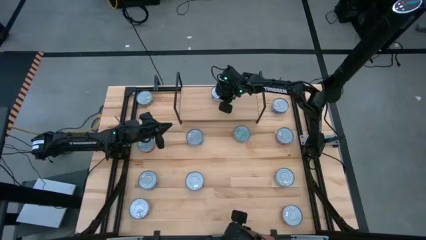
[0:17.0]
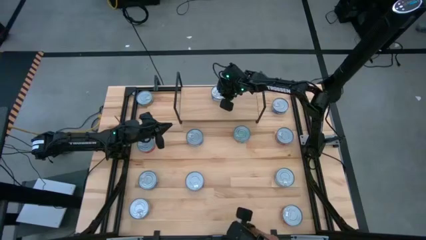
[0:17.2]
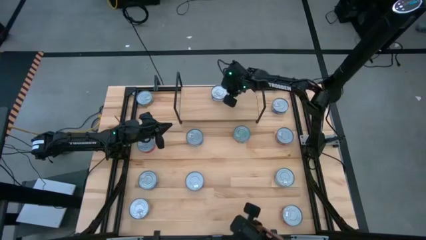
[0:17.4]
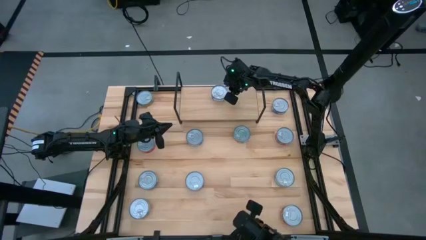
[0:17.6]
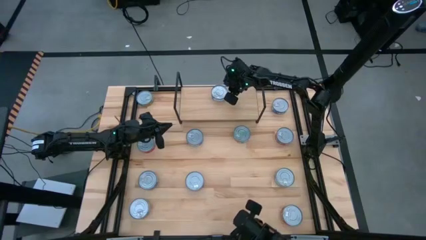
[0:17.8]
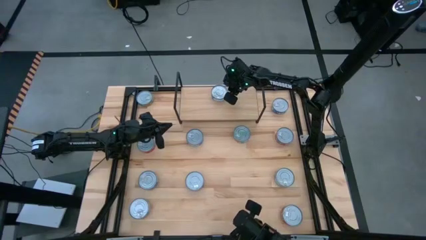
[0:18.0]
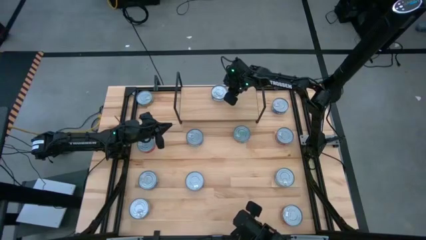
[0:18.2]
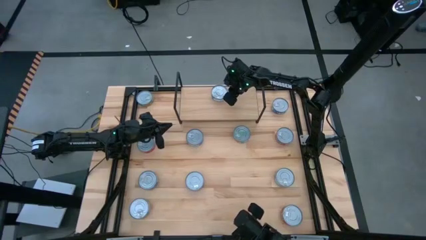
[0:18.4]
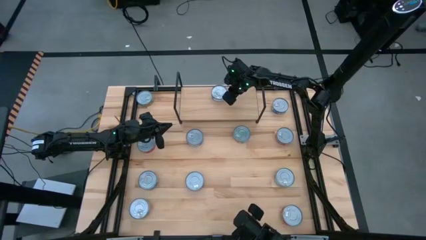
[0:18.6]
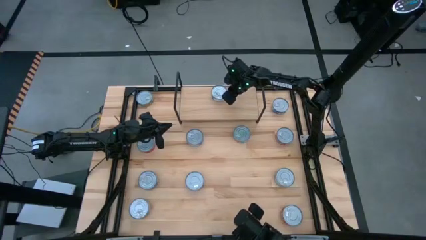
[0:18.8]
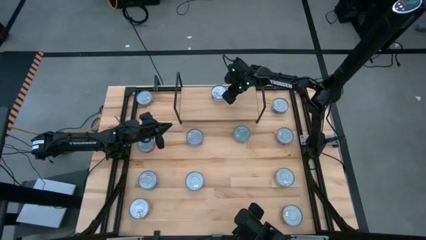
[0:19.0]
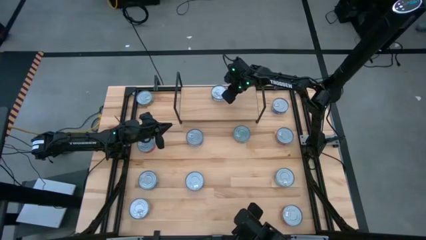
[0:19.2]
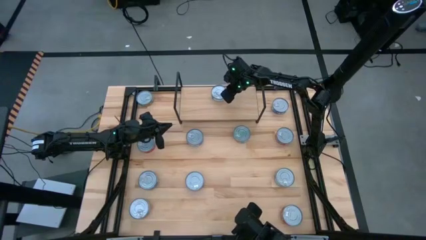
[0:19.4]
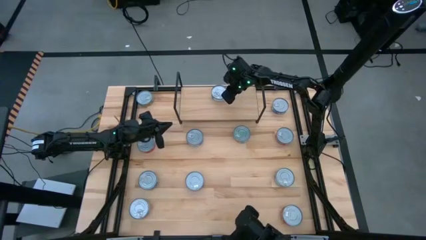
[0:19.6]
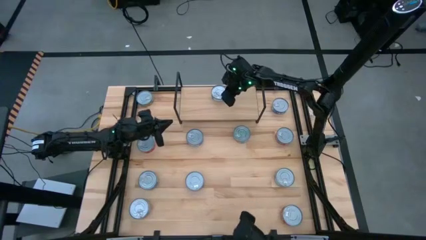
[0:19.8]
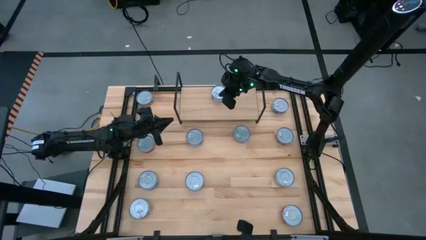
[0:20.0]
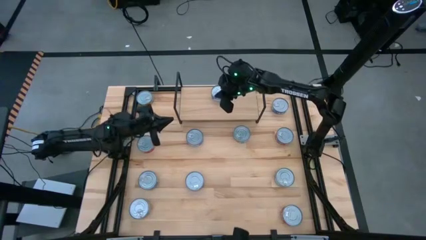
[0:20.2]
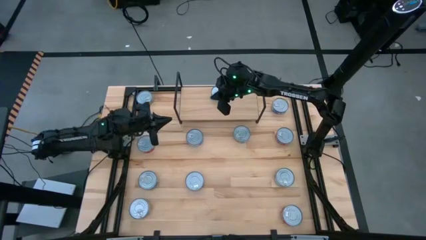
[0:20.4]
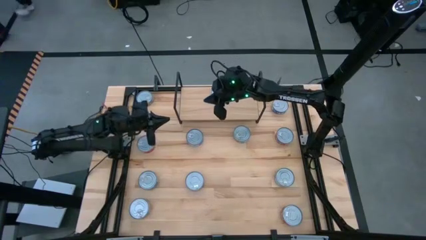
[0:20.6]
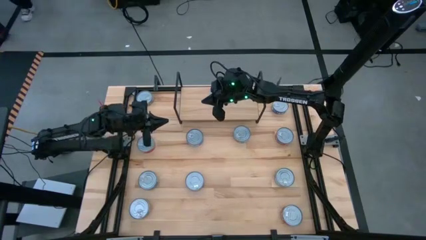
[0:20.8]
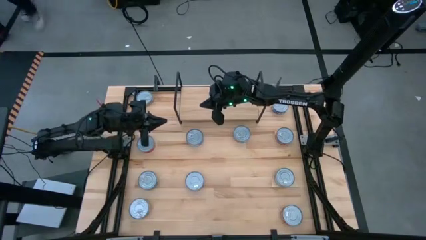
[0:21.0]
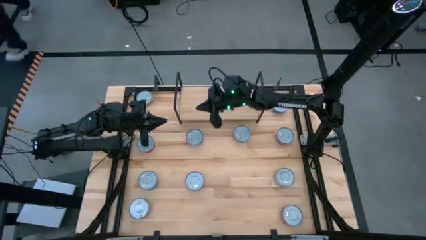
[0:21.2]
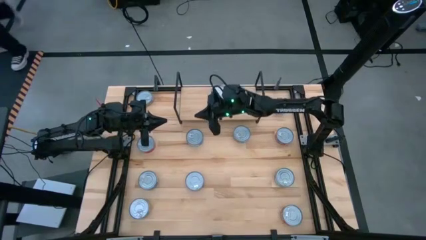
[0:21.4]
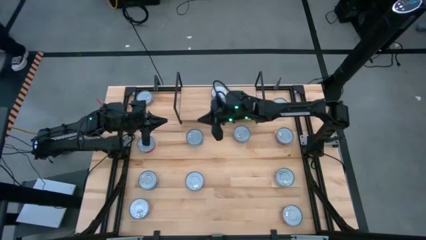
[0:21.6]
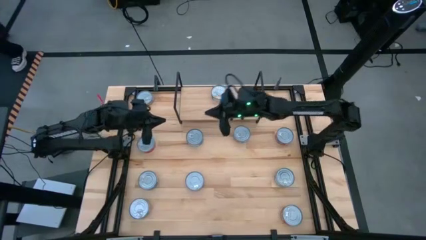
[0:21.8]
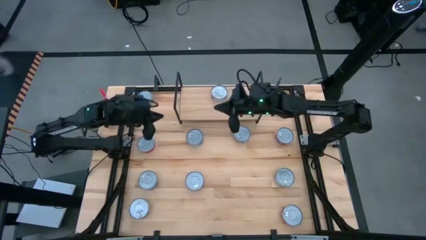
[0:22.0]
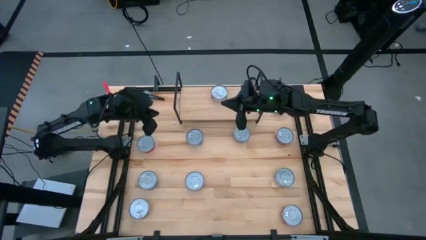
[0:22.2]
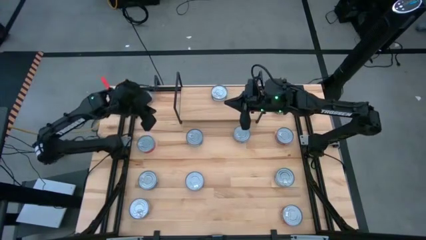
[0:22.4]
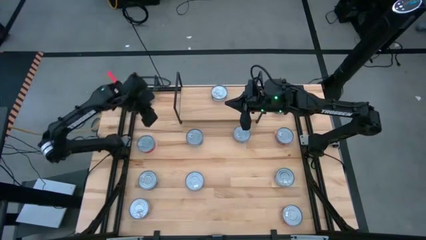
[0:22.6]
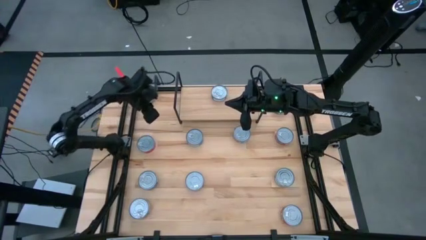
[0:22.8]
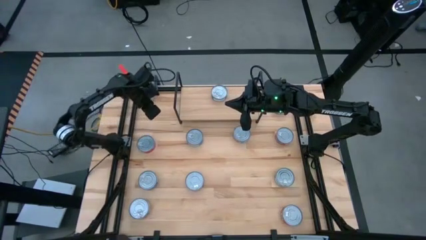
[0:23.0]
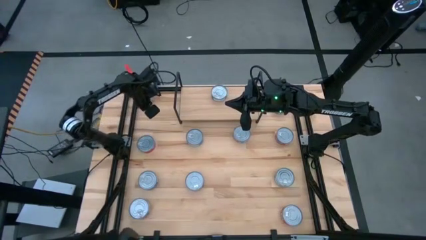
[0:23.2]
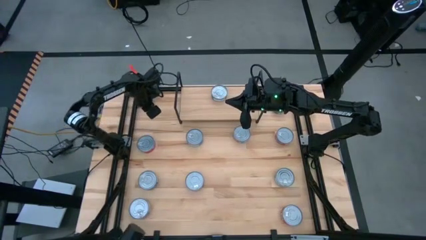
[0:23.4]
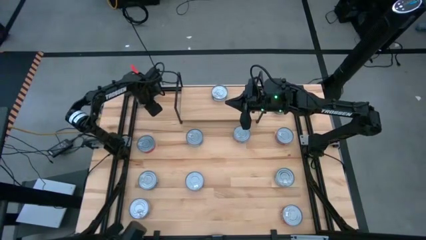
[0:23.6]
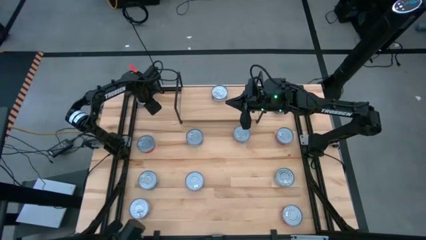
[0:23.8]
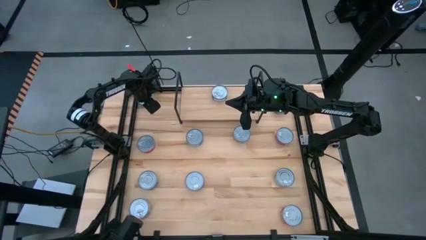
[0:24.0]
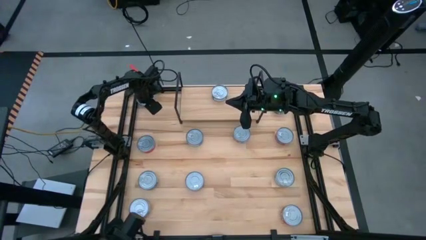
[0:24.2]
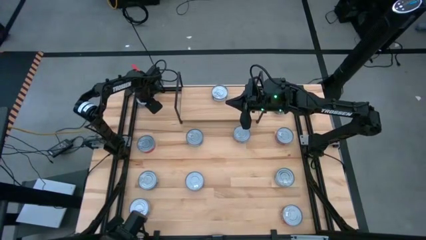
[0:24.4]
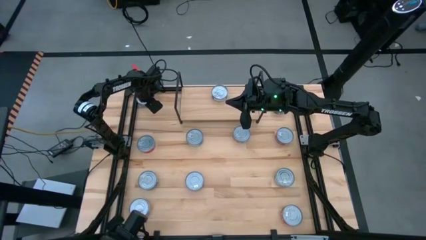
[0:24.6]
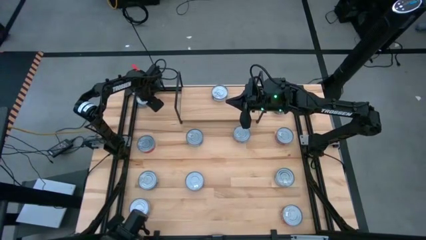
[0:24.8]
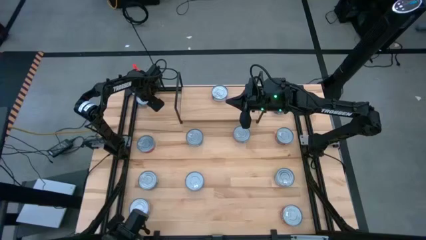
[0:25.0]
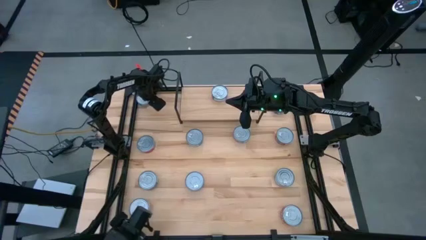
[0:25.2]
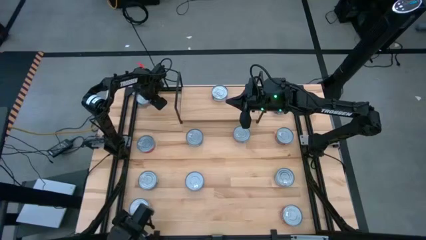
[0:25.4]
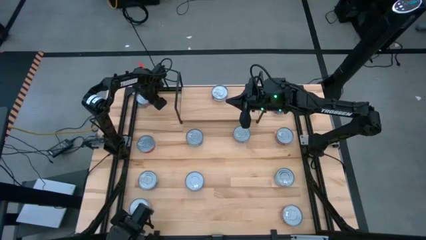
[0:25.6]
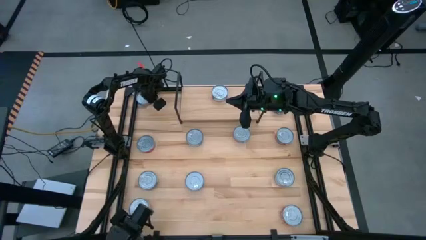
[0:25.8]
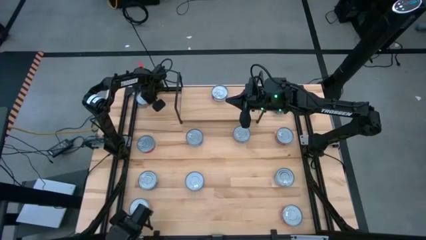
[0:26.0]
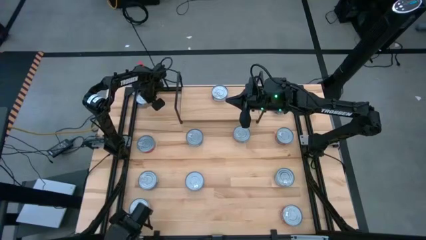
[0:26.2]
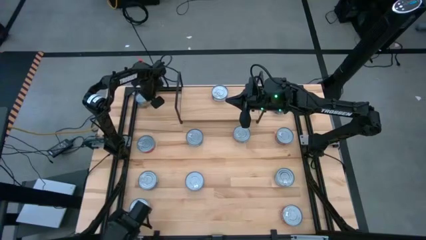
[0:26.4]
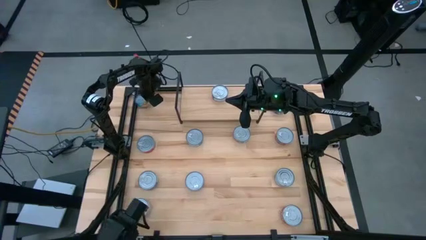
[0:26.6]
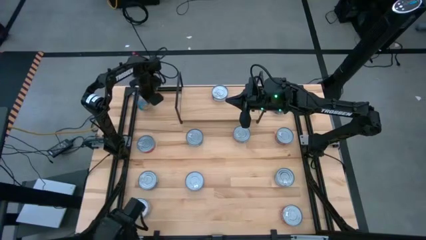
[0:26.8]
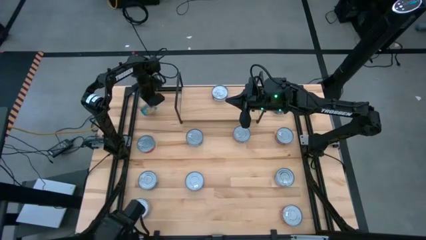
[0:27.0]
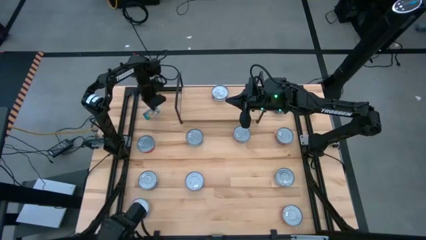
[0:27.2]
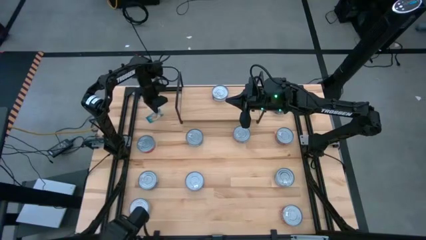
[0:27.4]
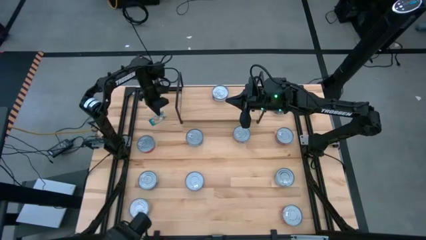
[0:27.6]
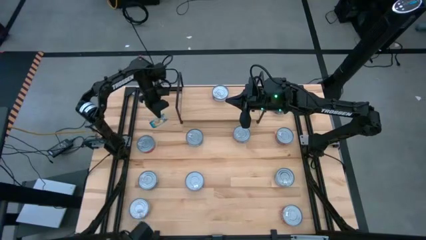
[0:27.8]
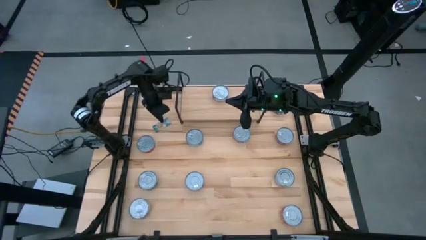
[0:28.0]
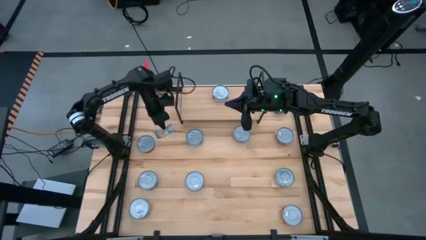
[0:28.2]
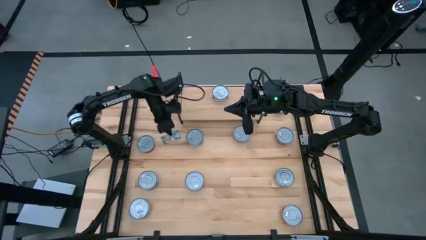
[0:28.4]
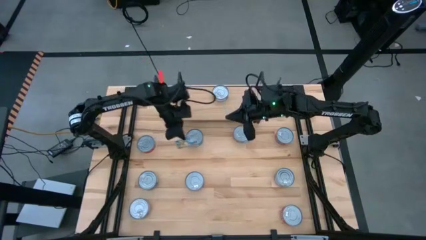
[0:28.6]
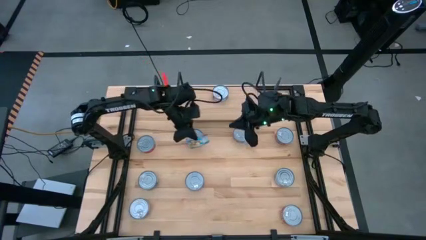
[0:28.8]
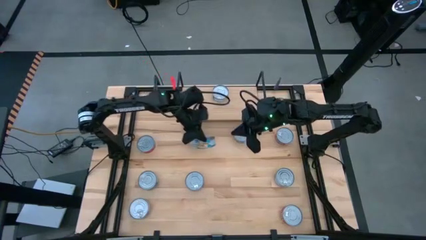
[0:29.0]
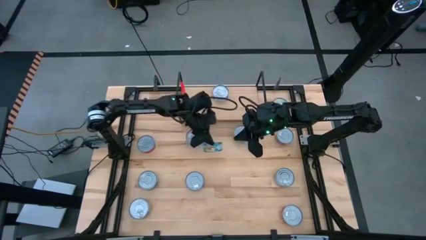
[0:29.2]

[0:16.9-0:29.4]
Task: Stack canned seafood by type on shelf
Put the yellow-blue tuna can on the shelf
